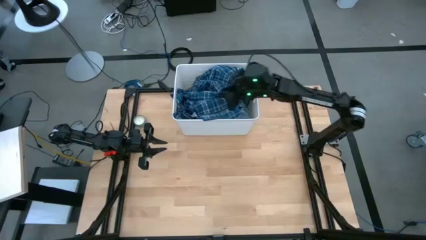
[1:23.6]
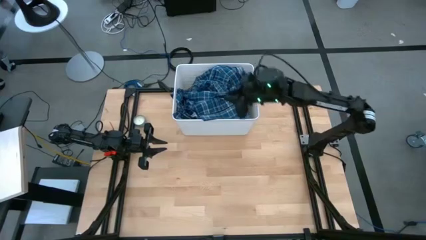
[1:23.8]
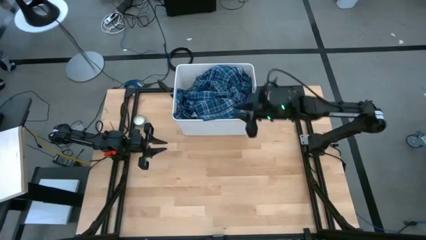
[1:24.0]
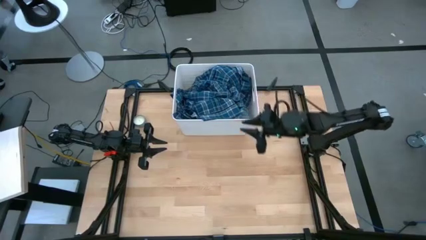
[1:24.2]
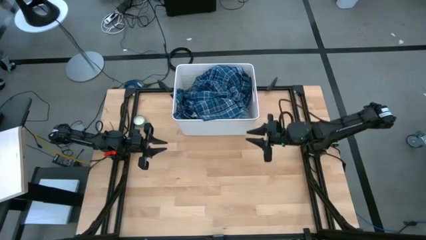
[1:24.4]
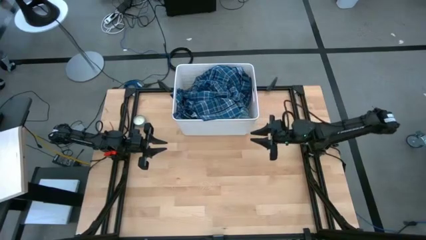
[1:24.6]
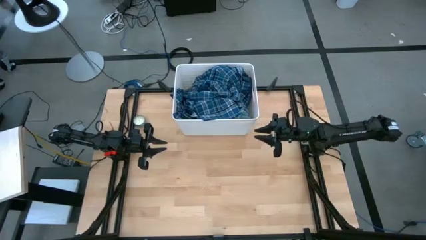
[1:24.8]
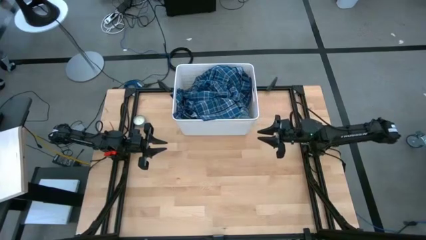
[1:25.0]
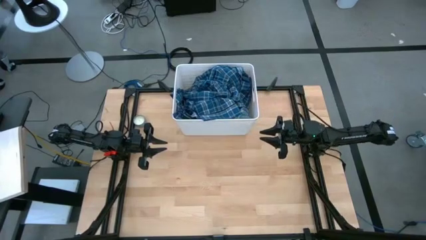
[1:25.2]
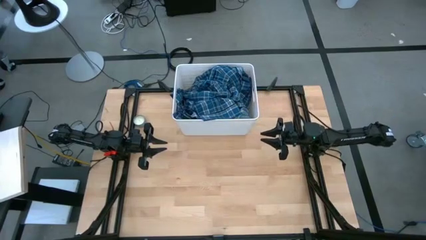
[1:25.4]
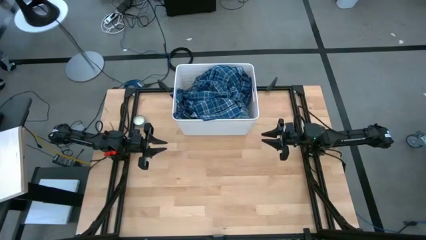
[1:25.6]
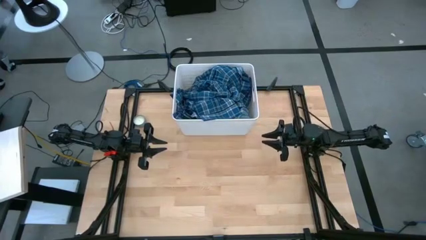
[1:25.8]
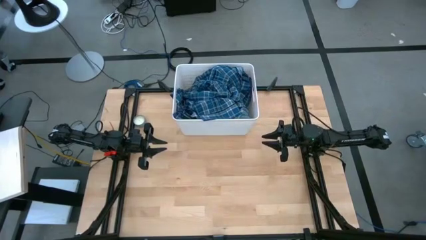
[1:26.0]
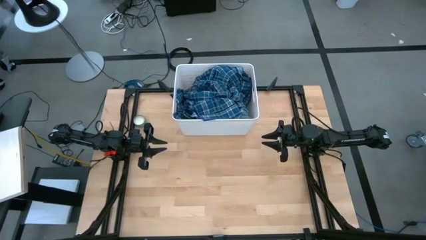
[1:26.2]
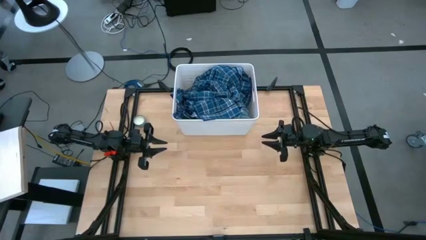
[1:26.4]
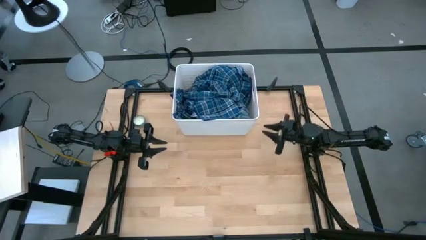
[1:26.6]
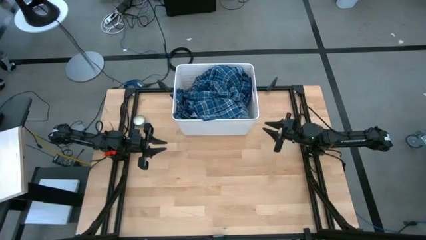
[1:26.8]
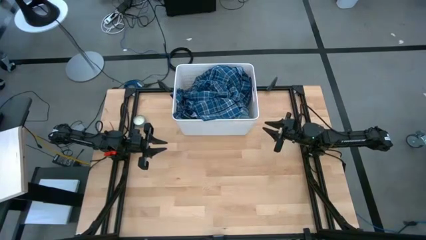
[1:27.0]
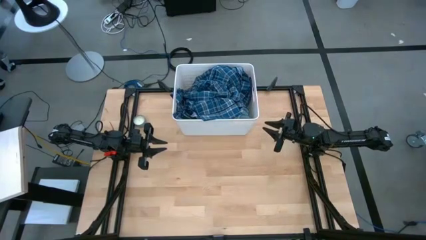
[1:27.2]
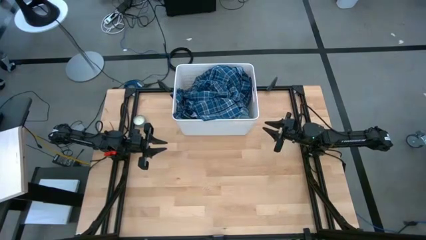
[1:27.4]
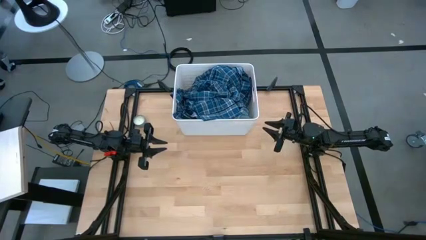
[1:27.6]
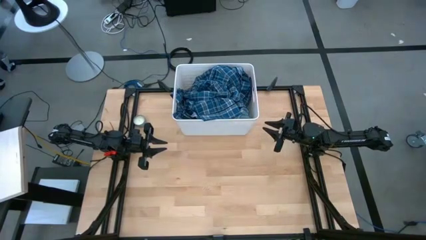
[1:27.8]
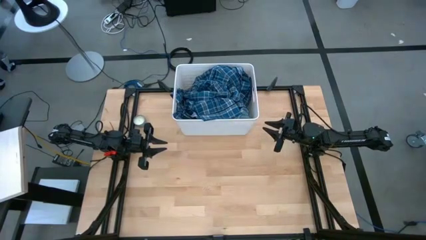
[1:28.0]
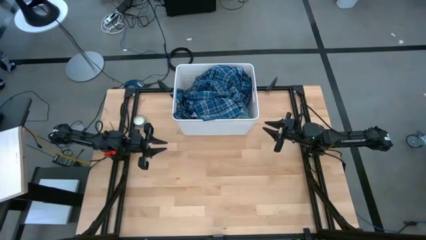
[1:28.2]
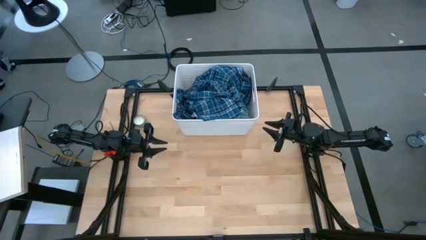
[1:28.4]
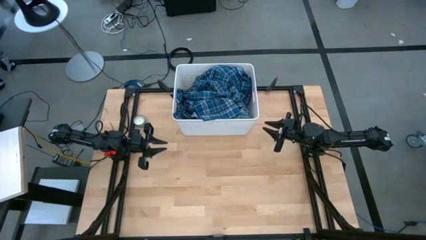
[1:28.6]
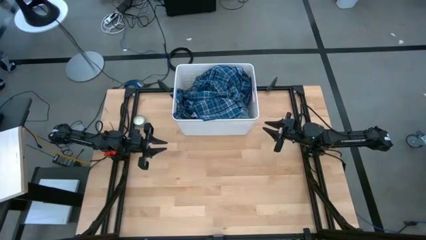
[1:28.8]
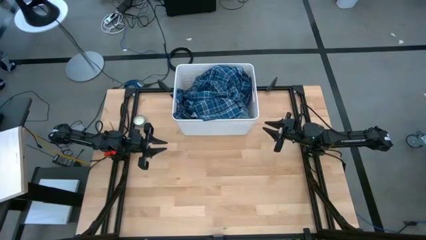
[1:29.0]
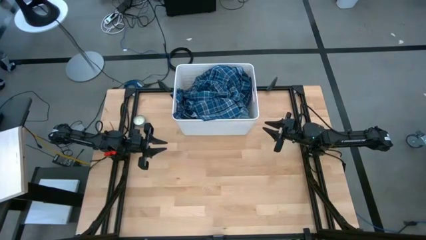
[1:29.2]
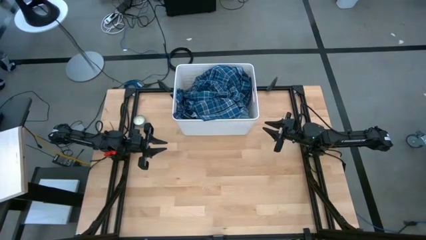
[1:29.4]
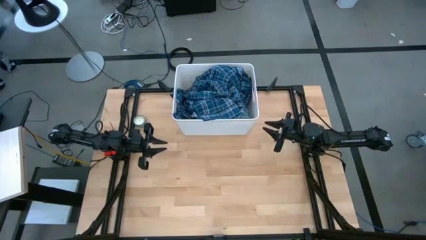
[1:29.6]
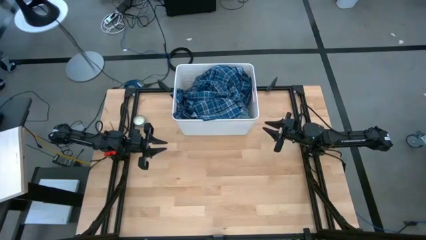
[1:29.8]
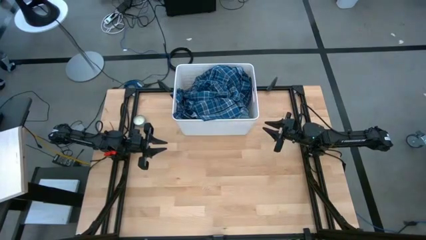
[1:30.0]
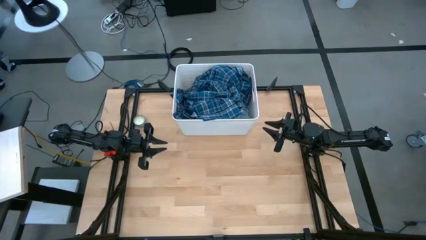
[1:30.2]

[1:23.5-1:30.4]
Task: Sort clothes
Return to Home Position

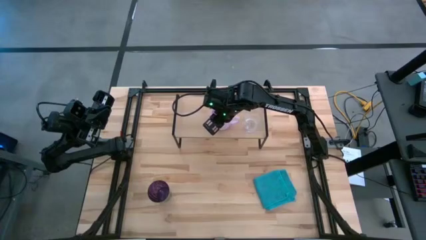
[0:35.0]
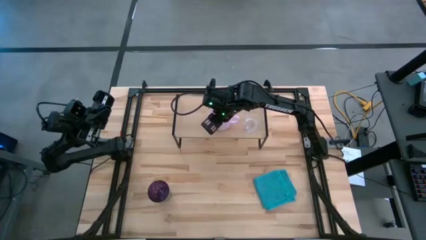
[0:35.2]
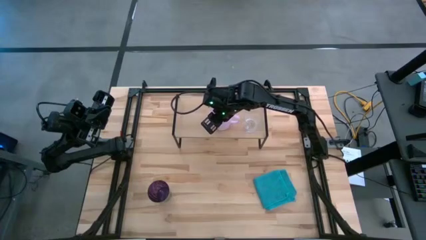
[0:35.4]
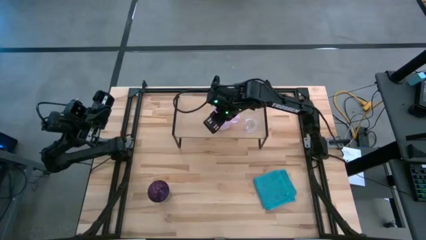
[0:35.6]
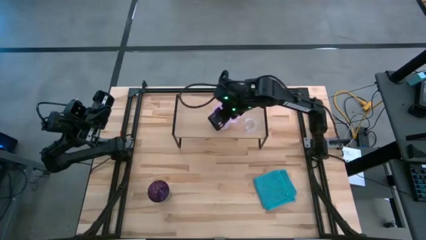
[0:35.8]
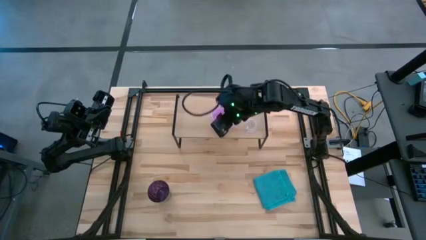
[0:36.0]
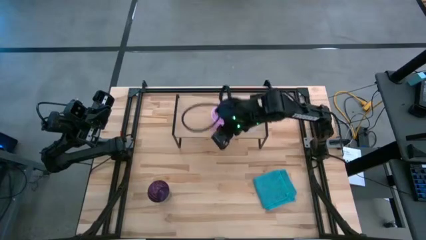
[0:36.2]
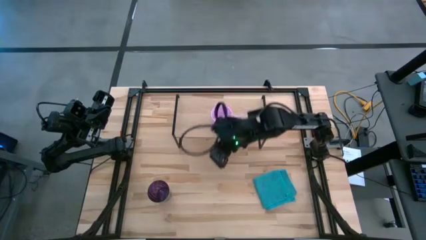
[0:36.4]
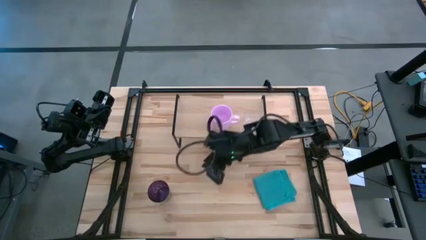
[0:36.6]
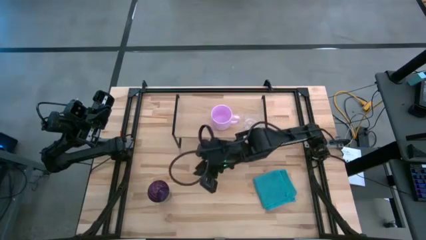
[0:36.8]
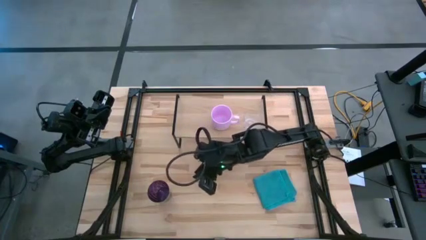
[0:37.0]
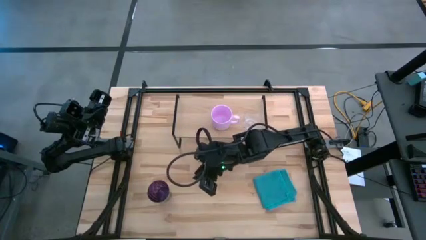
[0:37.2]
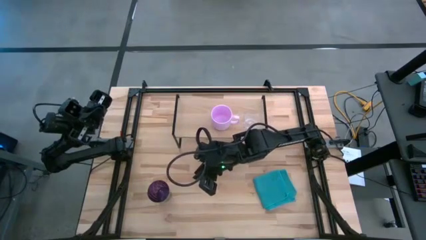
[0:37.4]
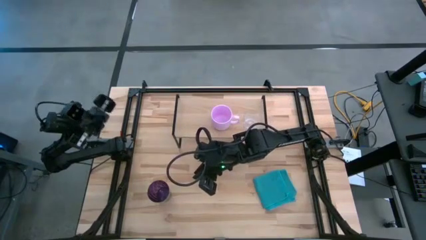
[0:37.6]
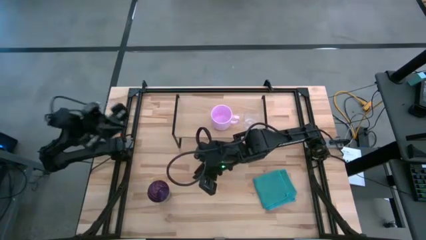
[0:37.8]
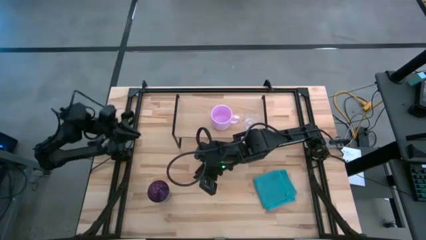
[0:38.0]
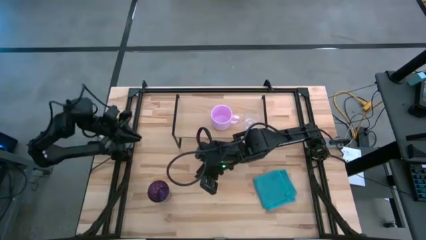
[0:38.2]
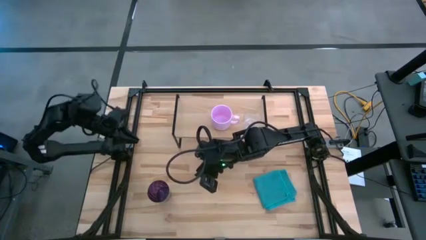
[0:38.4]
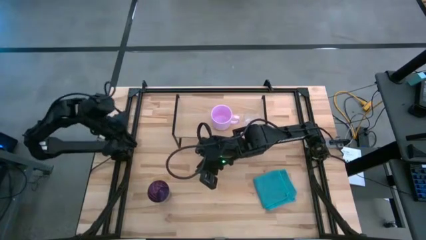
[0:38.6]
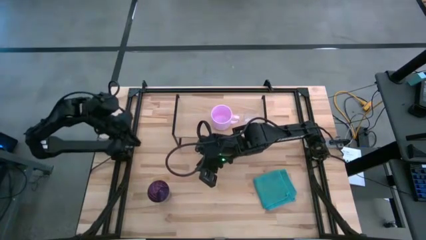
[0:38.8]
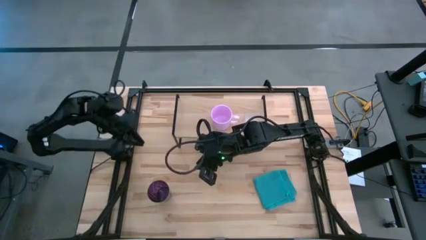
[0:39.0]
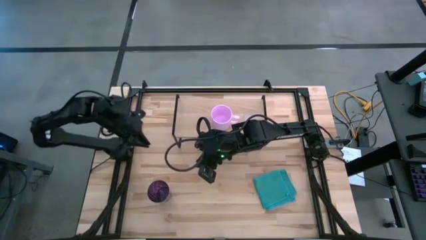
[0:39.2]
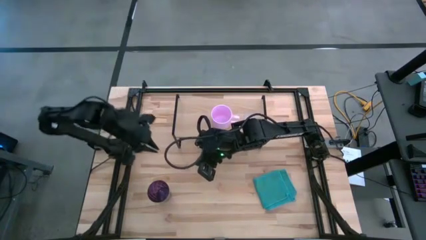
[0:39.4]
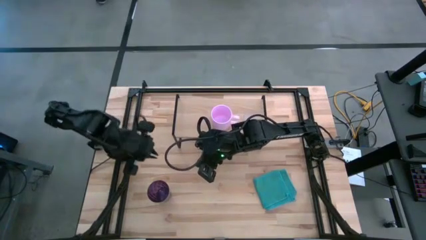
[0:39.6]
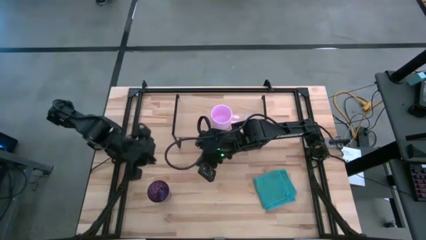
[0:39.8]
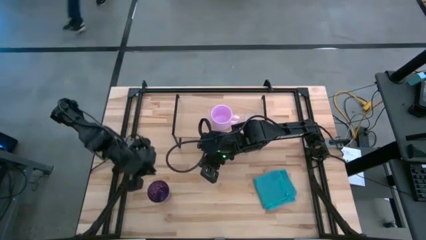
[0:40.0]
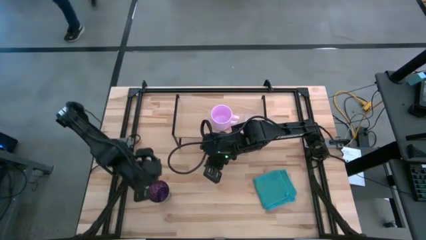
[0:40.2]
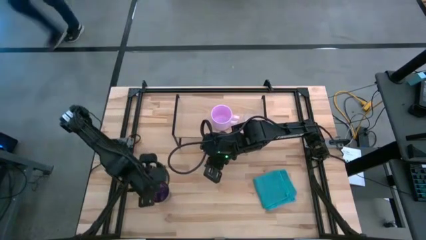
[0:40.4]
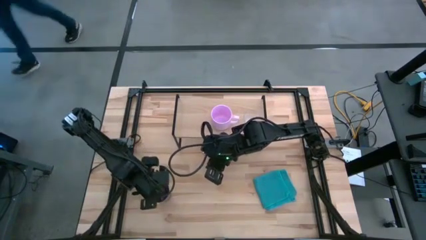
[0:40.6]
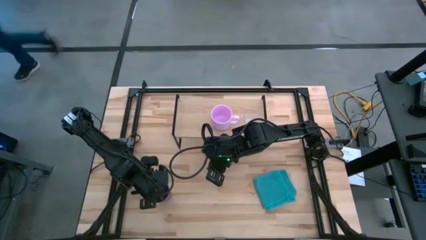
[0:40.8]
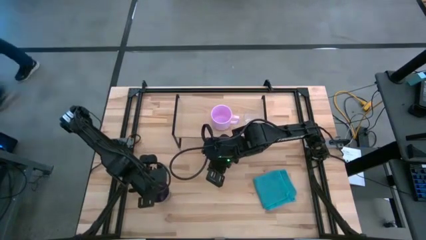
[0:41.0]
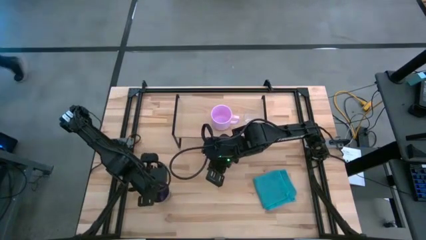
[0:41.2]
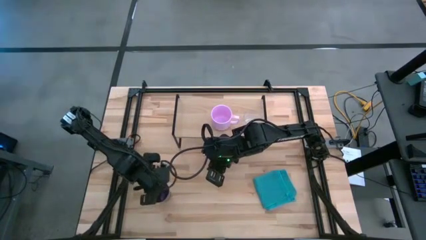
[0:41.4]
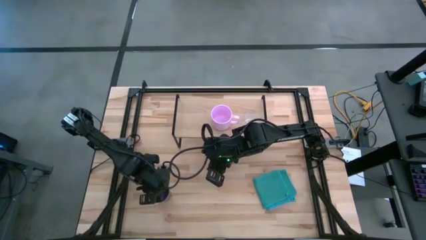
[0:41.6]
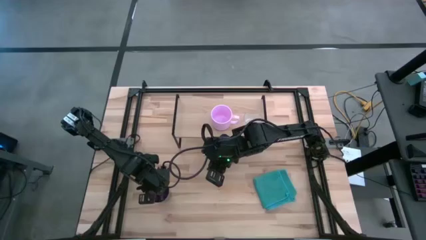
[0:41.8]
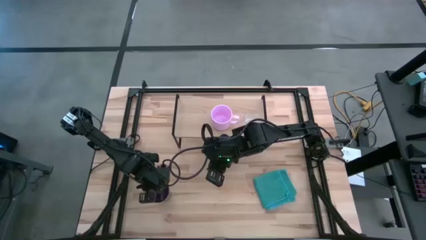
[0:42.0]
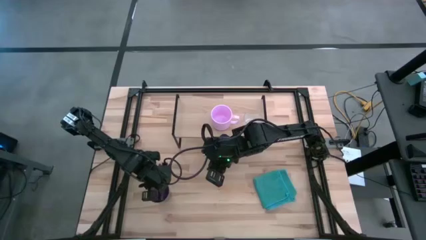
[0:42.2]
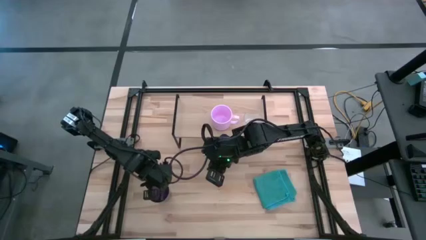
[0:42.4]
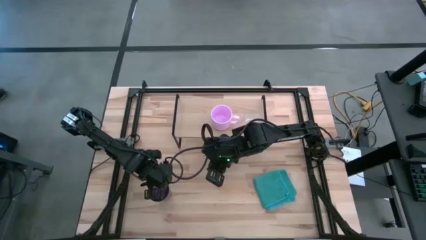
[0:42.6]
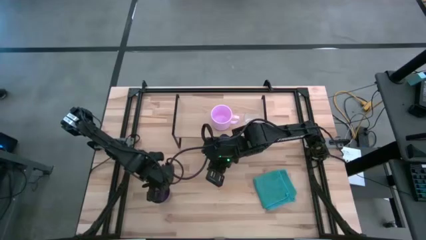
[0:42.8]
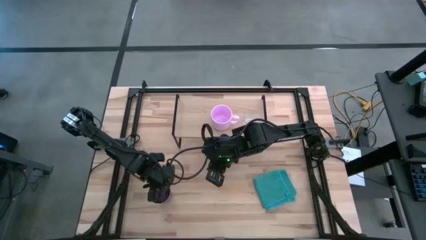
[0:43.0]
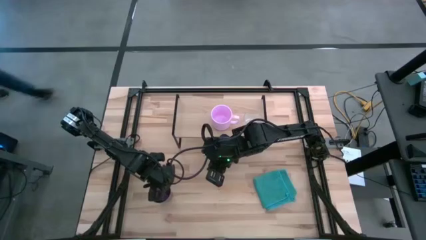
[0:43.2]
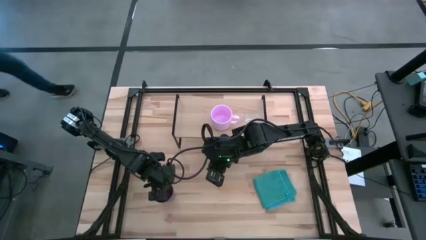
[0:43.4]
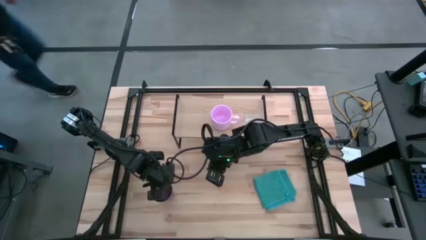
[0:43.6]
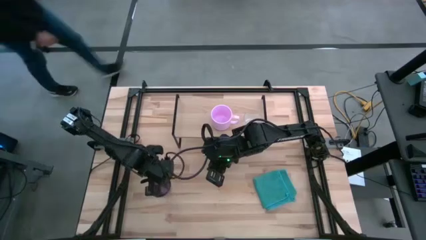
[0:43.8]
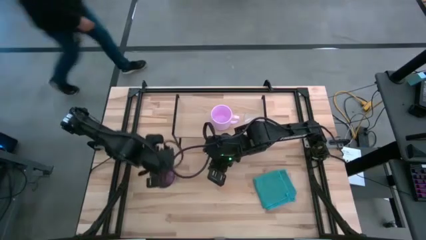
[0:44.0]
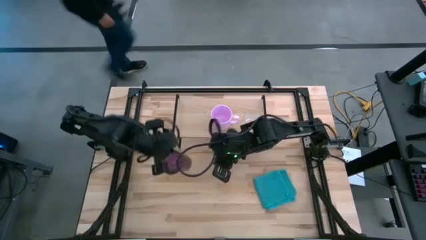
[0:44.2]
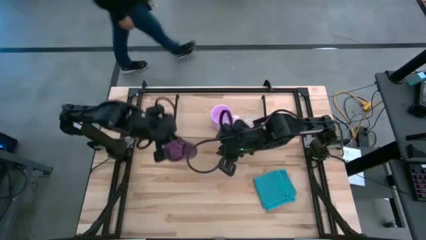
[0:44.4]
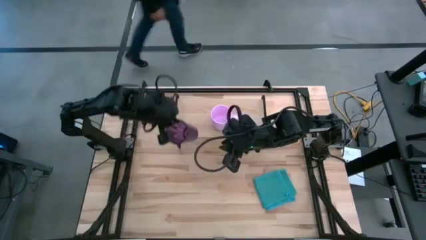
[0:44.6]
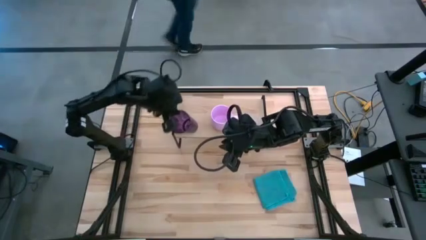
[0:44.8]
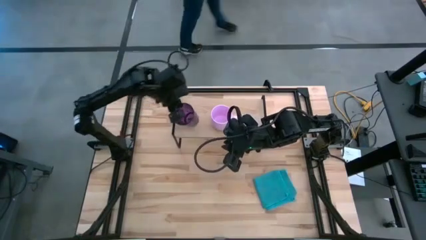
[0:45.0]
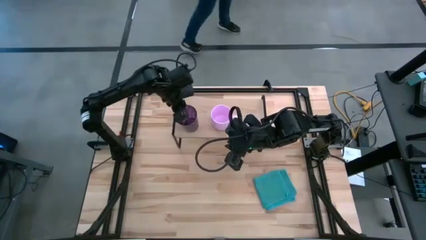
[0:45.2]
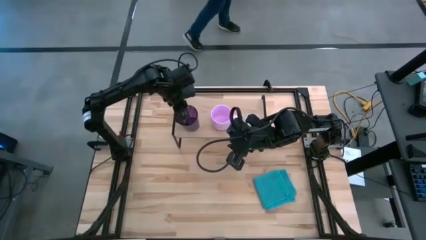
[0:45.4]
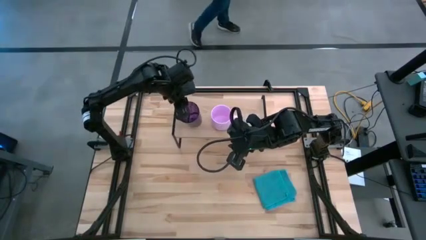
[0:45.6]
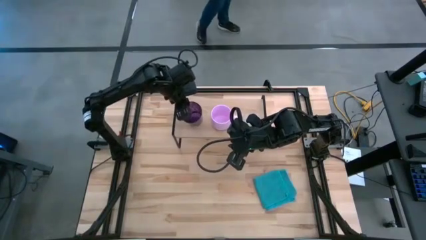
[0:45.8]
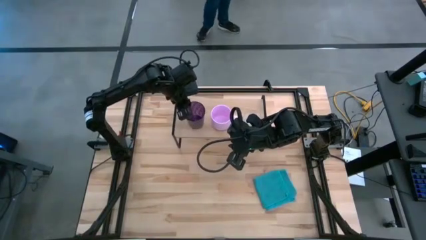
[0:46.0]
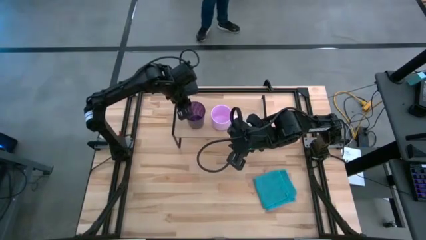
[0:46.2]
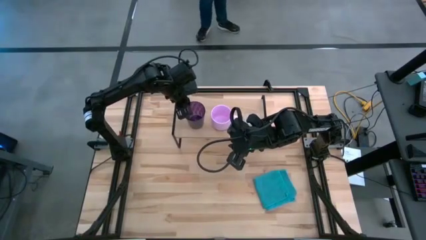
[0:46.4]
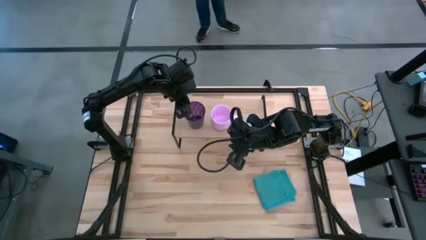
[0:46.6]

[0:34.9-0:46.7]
Task: Stack small to large cups/mugs on shelf
Put the purple glass on the shelf
